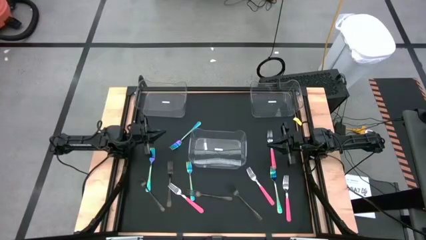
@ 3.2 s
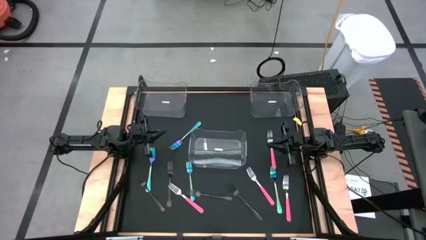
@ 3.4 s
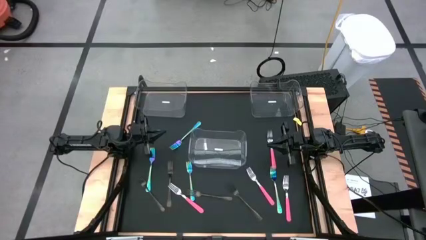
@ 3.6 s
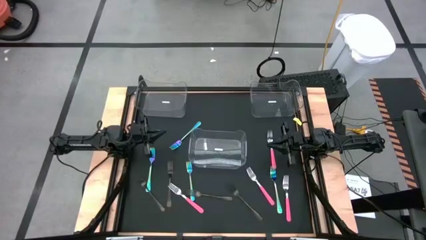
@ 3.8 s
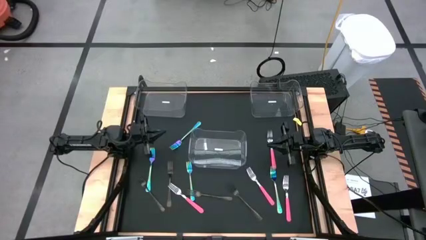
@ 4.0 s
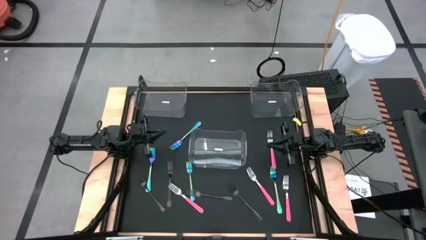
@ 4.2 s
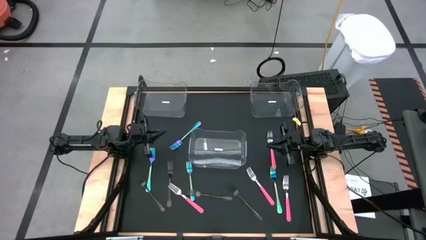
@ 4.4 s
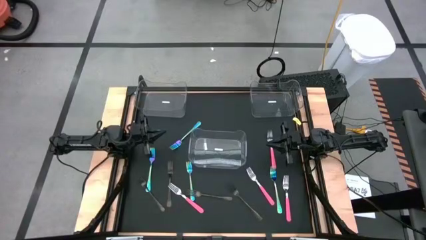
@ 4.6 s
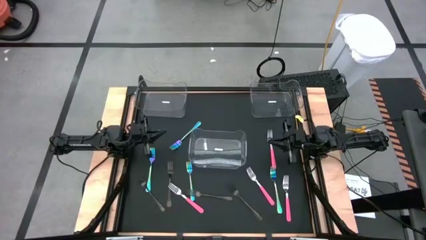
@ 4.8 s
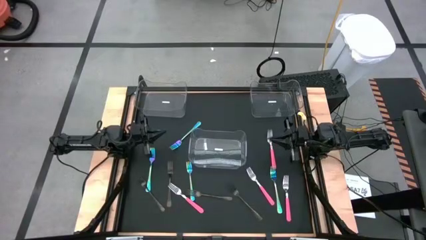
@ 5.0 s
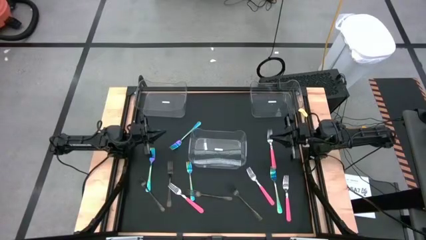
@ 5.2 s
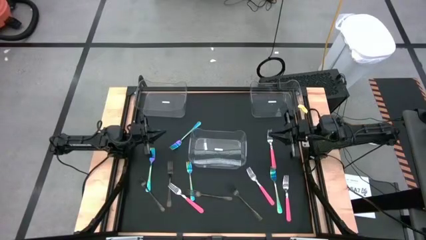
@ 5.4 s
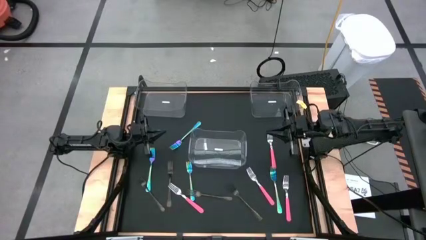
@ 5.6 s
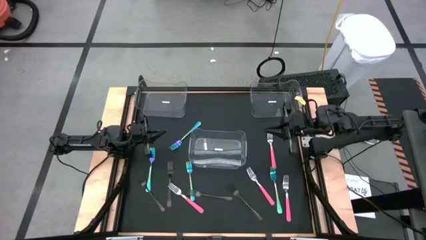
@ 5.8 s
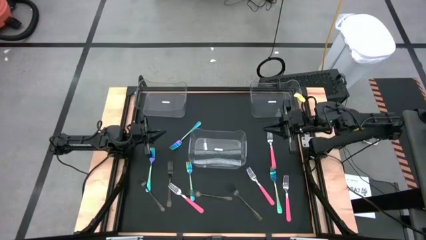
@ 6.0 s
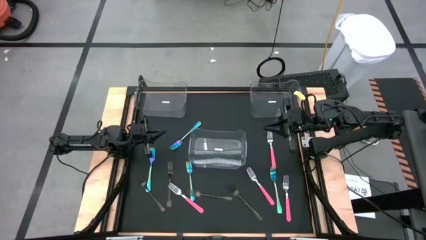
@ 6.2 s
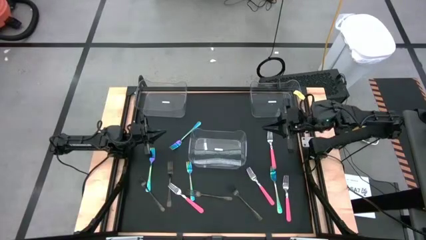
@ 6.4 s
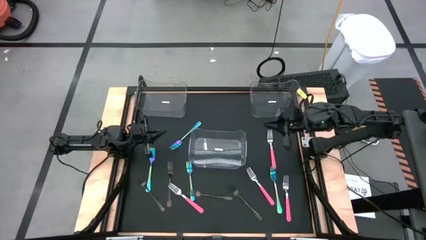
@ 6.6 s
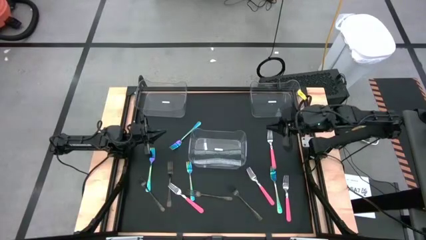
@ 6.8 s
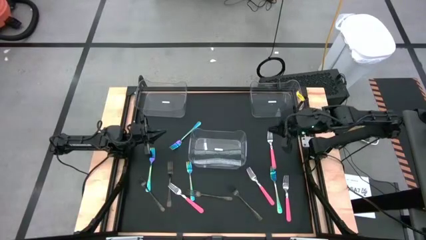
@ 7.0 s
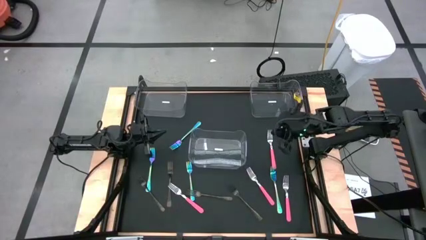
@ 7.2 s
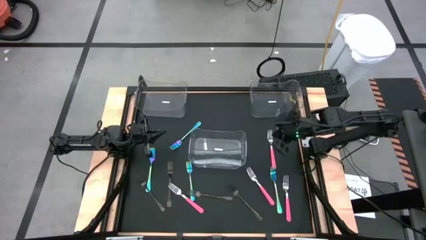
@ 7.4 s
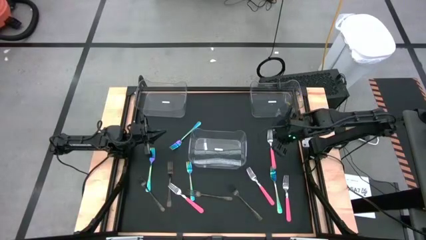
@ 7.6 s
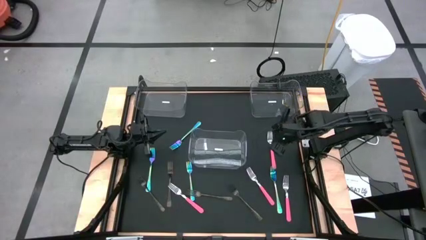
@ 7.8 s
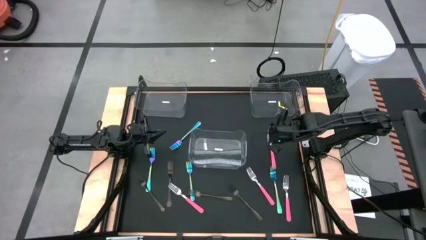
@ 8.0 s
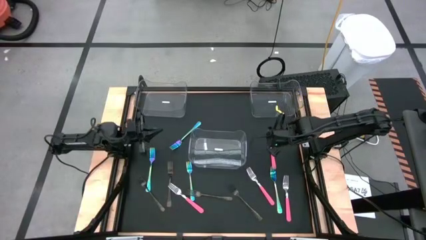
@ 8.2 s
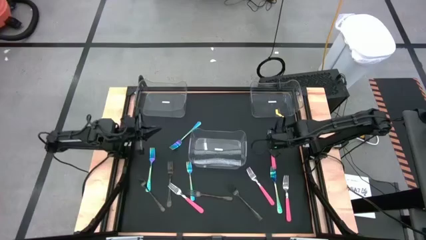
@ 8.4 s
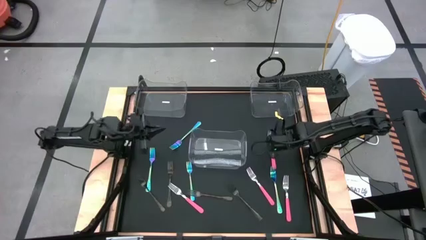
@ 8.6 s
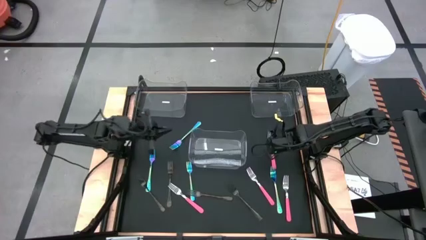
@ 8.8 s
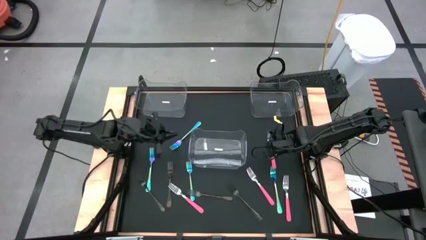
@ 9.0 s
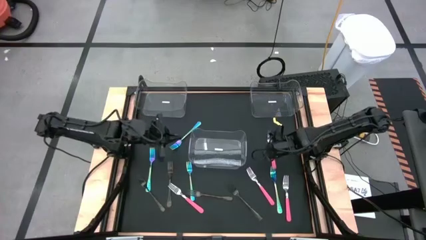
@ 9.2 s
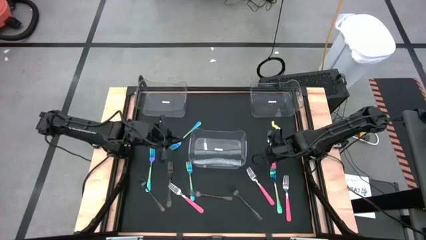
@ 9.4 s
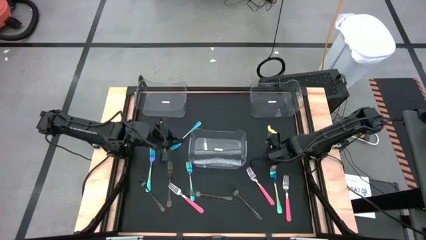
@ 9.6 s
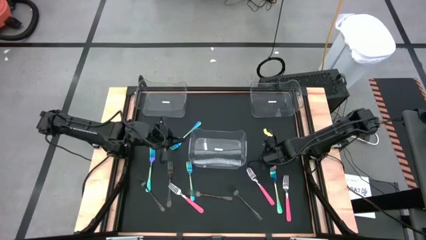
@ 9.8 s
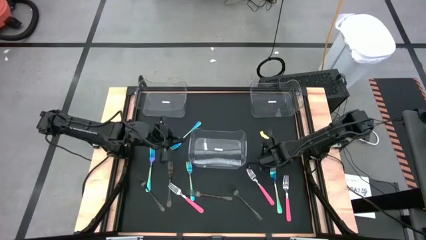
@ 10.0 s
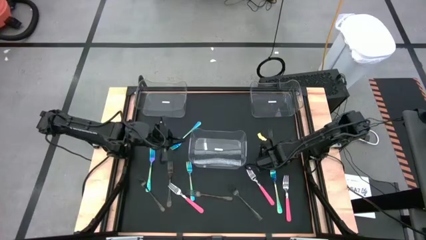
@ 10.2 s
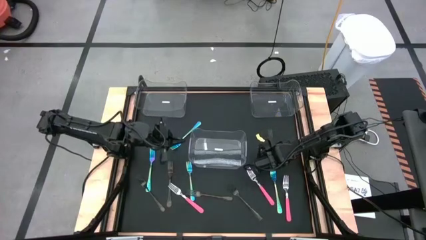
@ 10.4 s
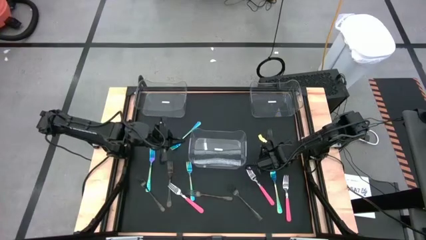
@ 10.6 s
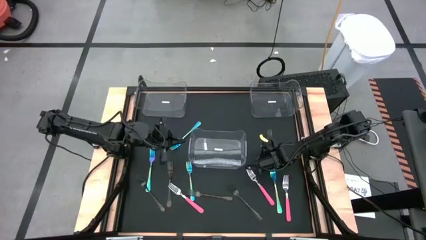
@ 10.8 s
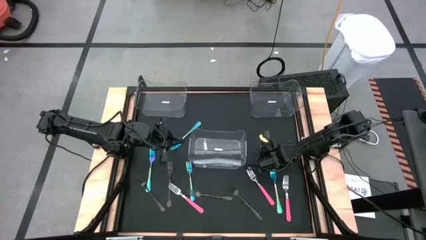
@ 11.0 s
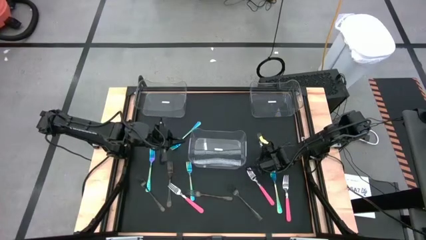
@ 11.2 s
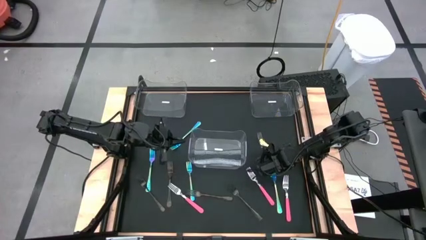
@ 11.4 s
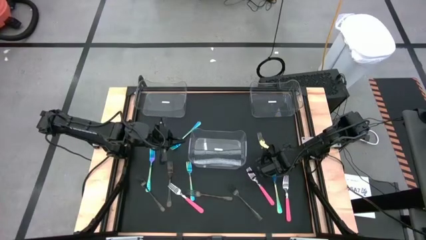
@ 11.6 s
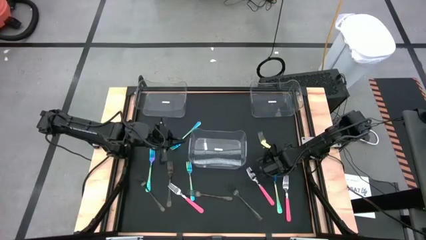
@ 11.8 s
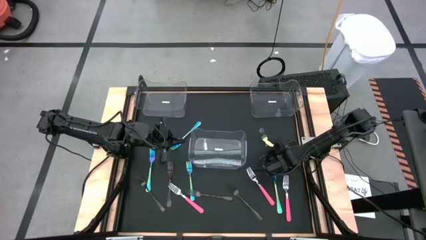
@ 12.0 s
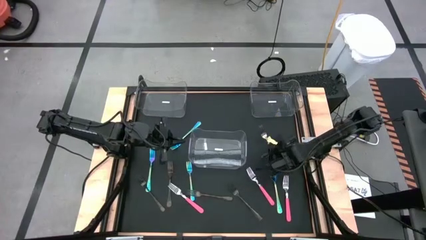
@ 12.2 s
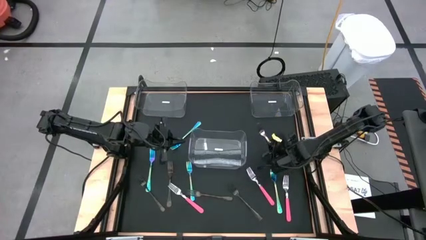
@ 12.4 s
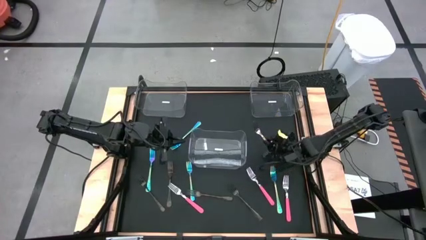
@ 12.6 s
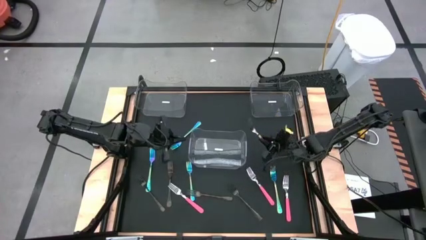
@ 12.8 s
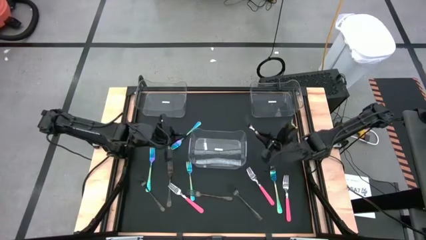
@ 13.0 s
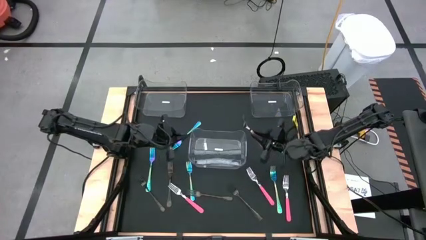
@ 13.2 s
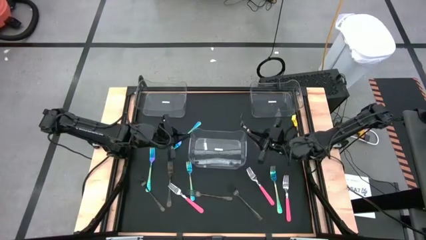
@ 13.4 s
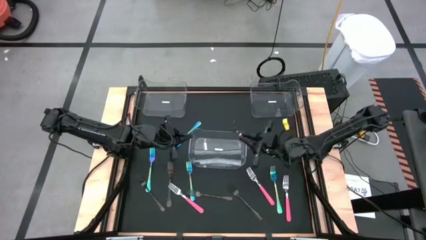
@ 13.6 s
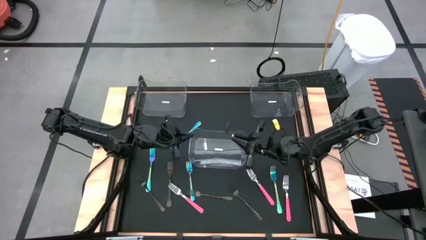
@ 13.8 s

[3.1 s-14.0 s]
Task: Sort silverware by color (type)
Put the pink fork into the left transparent bin

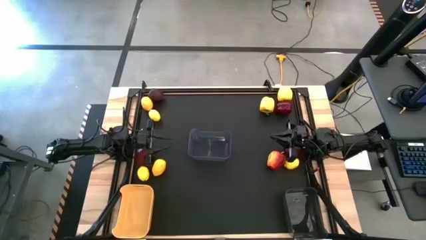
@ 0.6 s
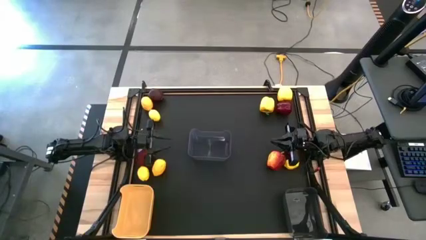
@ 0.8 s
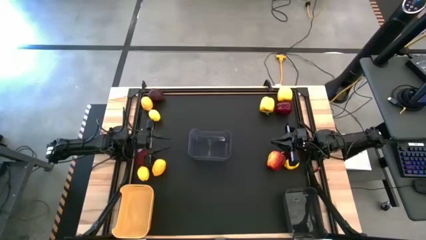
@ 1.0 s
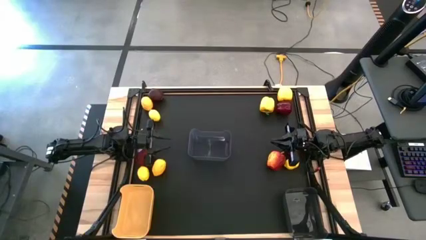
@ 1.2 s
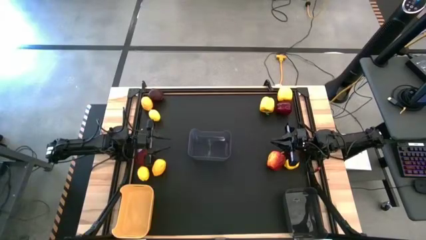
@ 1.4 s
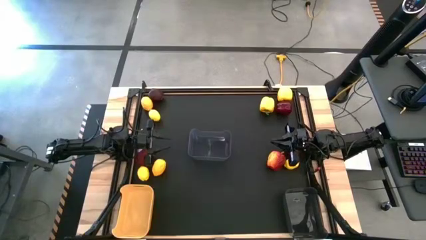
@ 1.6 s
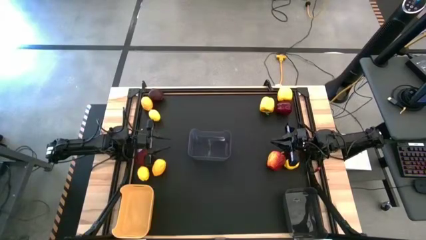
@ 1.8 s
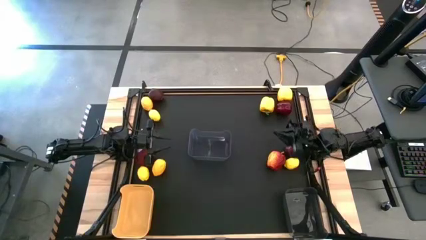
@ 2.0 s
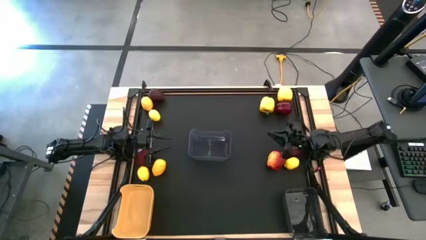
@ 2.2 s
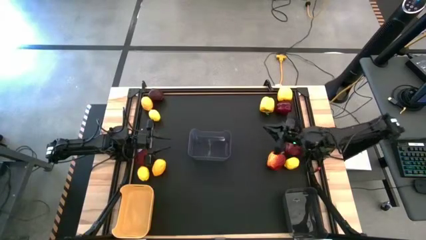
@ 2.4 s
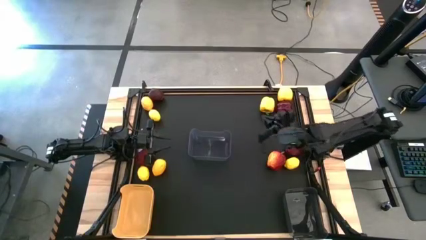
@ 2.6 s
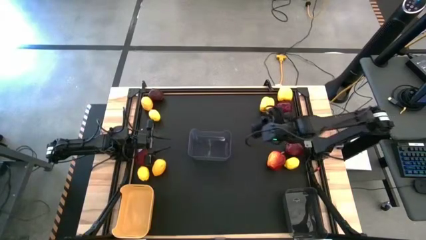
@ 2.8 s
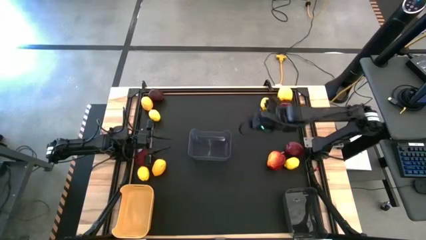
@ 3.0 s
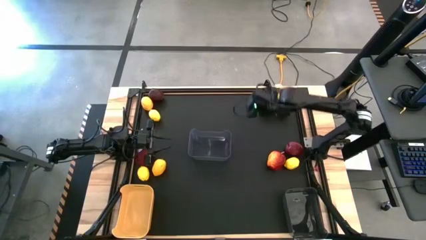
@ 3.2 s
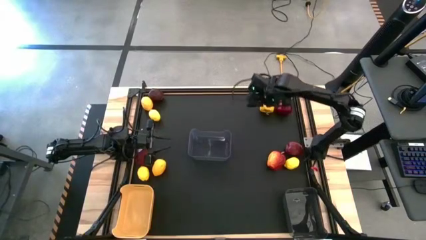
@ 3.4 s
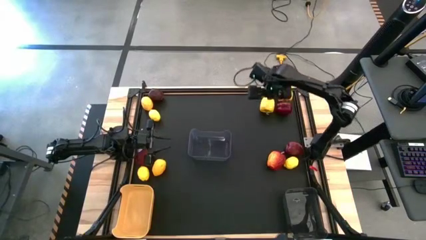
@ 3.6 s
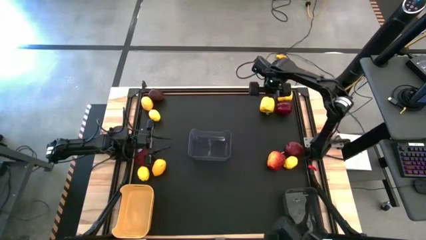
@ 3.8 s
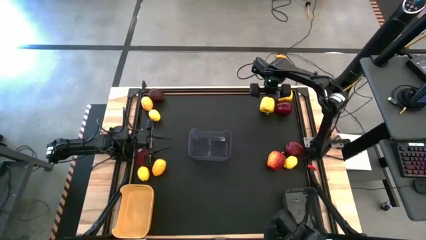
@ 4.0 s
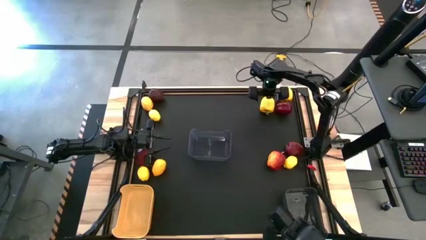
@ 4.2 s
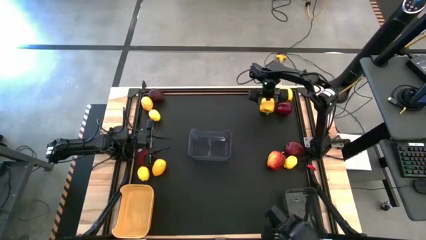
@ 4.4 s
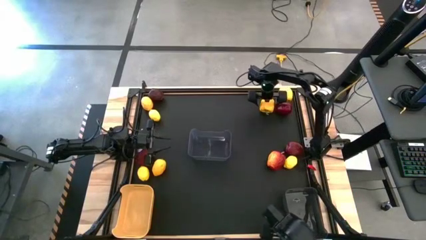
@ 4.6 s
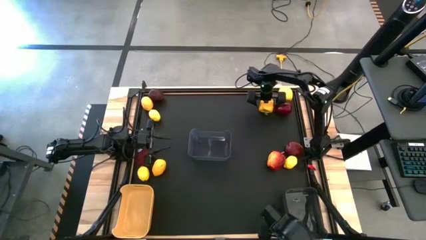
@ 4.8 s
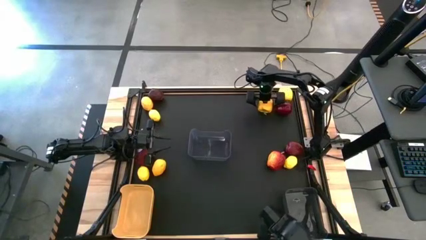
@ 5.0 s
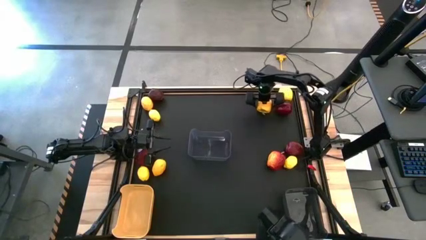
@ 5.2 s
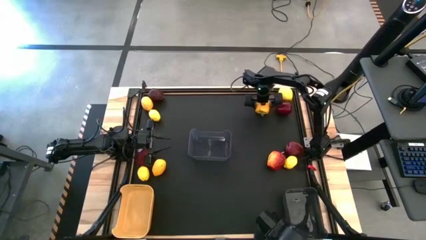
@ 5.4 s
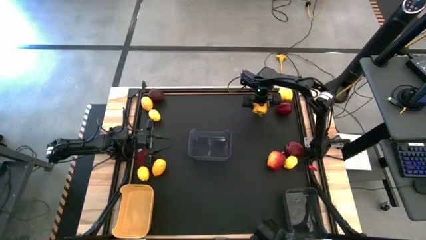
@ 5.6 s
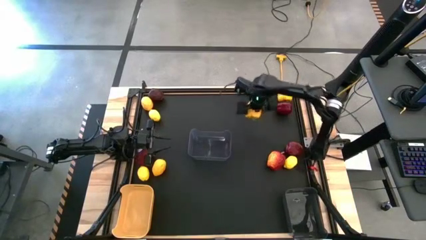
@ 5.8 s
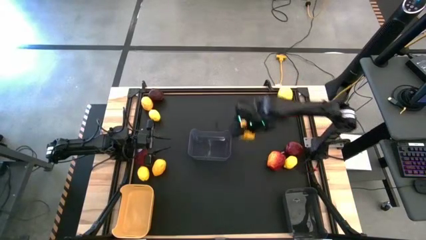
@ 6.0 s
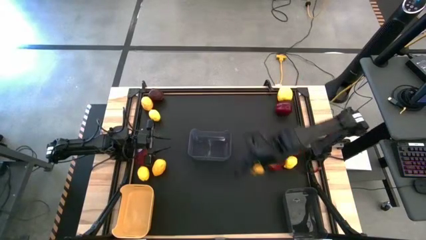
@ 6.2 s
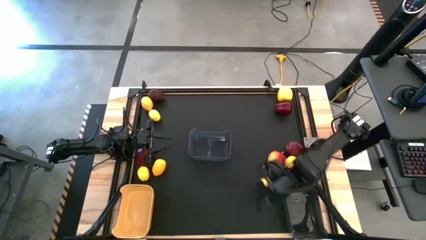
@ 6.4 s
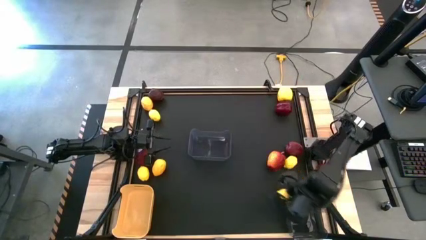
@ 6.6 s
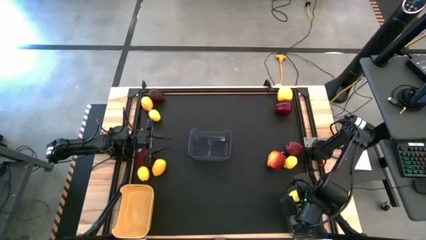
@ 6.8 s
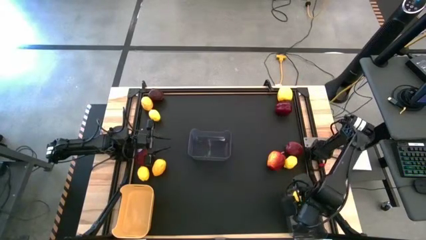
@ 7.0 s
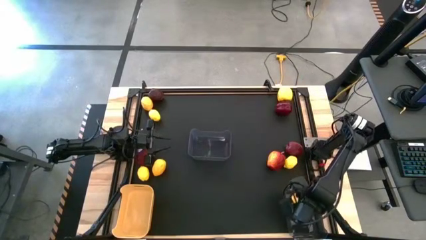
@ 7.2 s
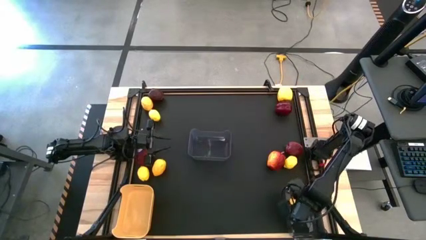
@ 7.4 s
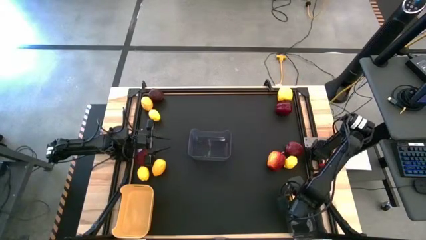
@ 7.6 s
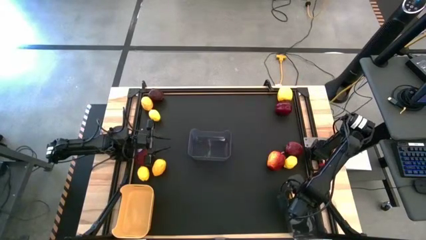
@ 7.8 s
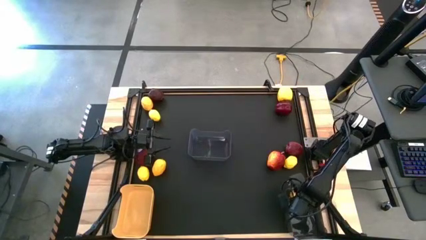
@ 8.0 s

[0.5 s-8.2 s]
Task: Sort produce into baskets
Put the yellow bell pepper into the bottom black bin
